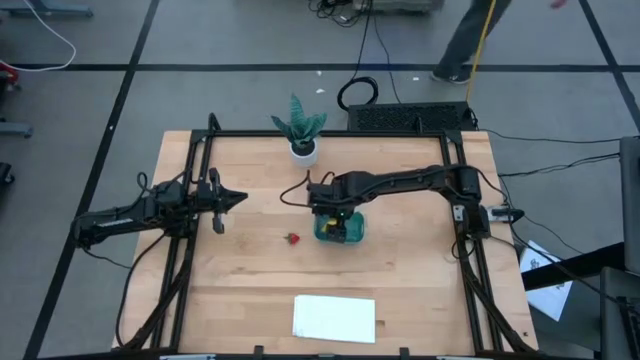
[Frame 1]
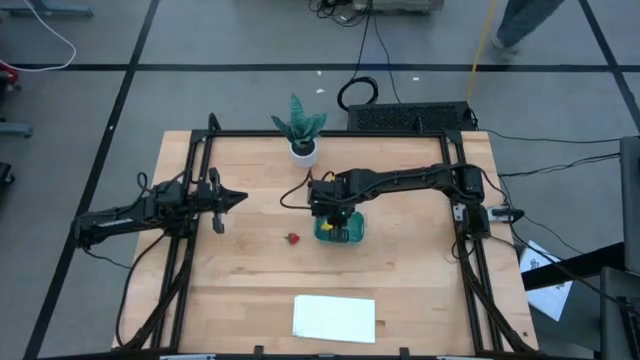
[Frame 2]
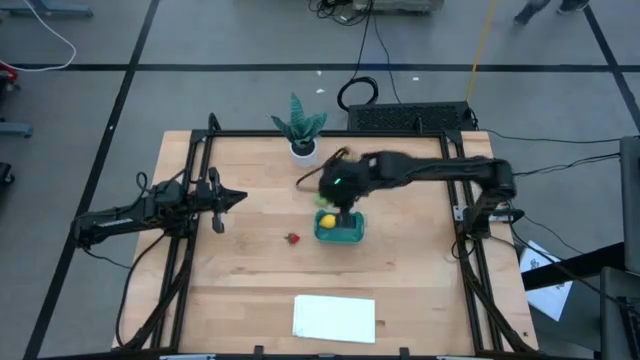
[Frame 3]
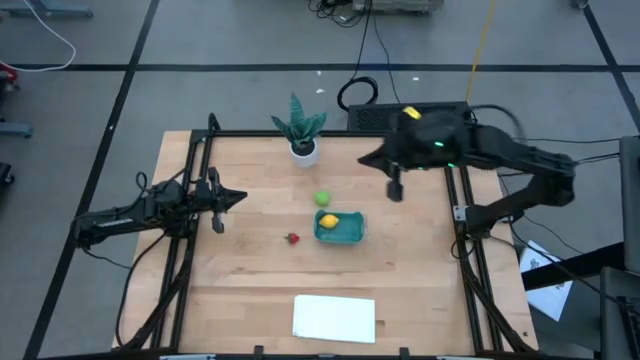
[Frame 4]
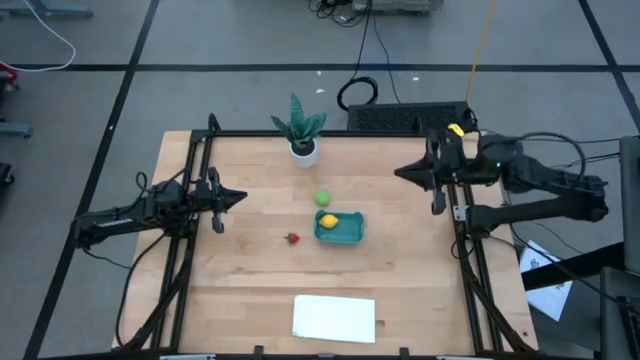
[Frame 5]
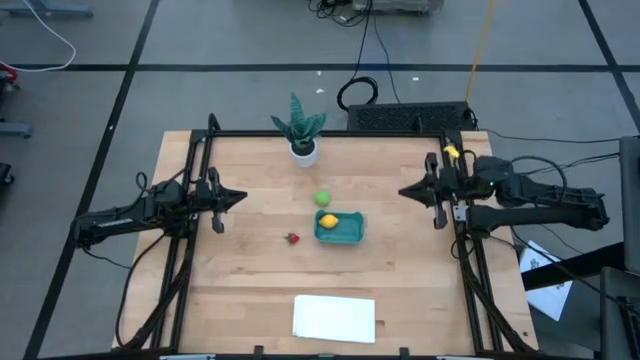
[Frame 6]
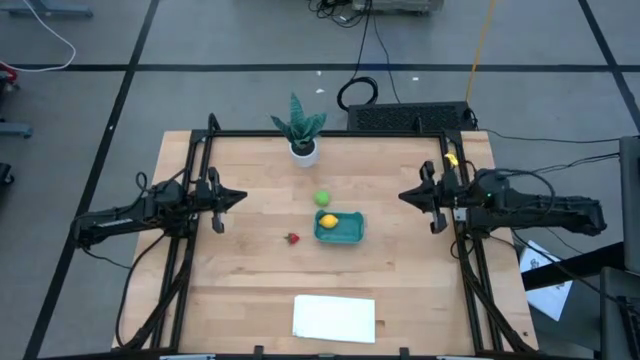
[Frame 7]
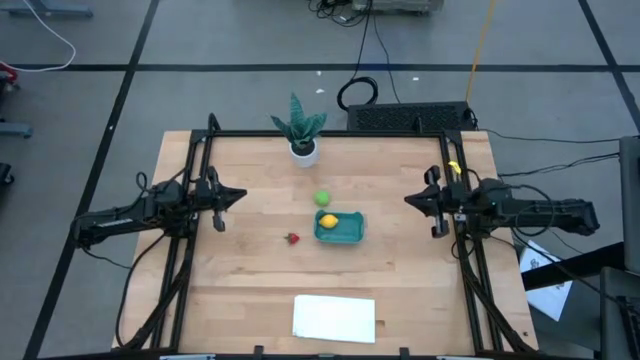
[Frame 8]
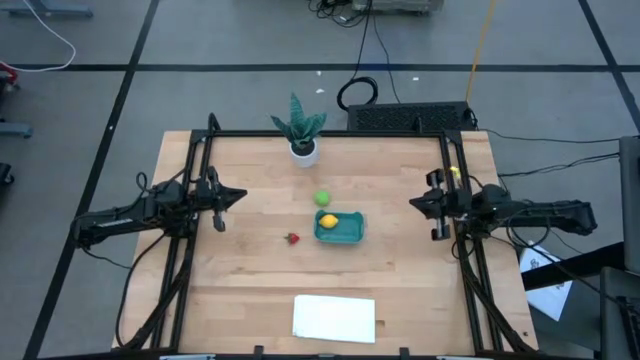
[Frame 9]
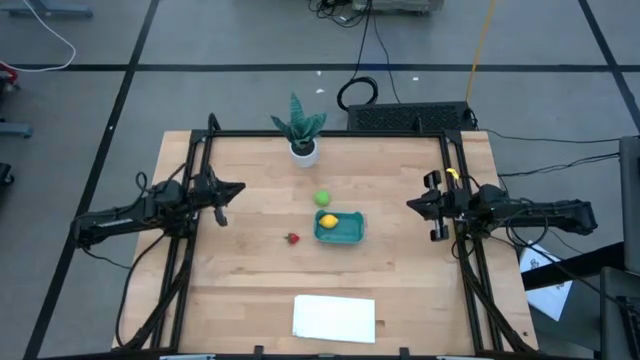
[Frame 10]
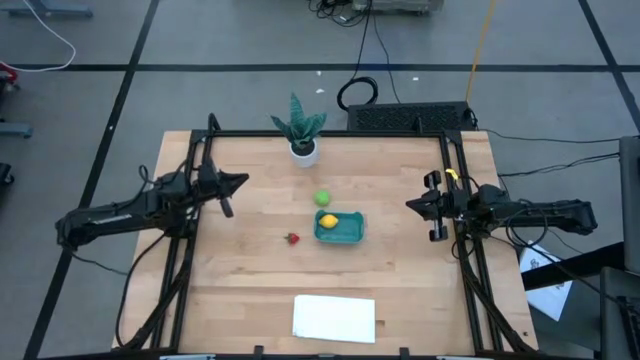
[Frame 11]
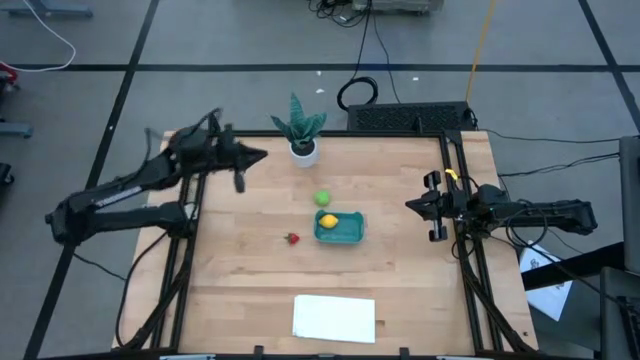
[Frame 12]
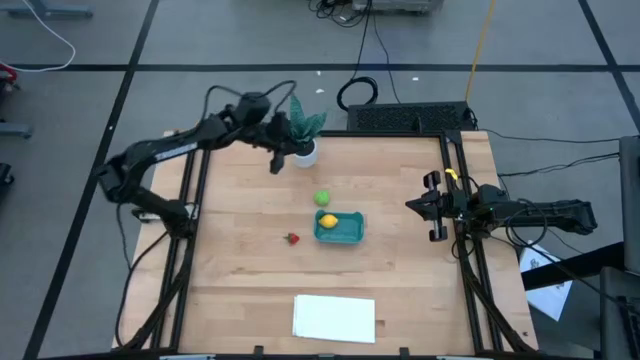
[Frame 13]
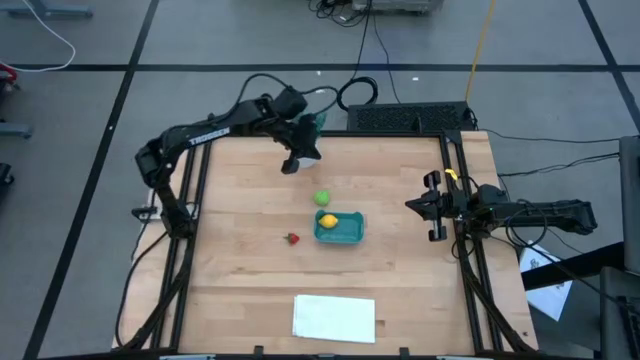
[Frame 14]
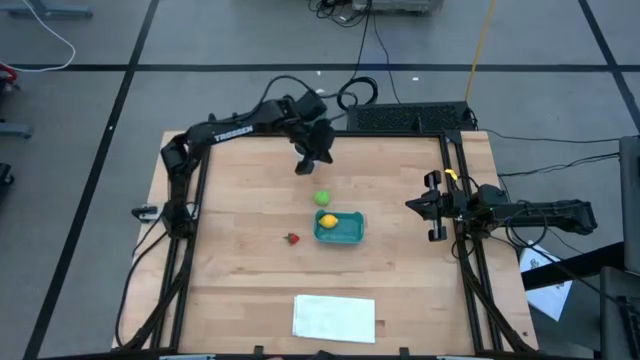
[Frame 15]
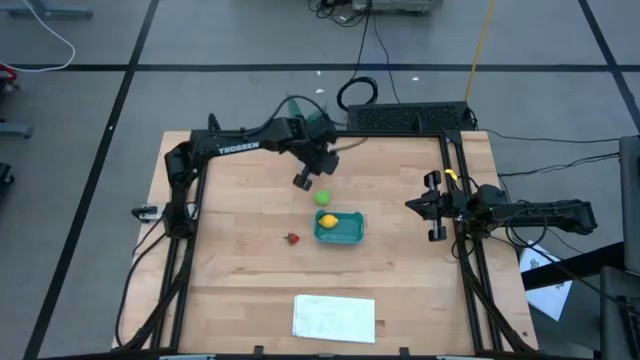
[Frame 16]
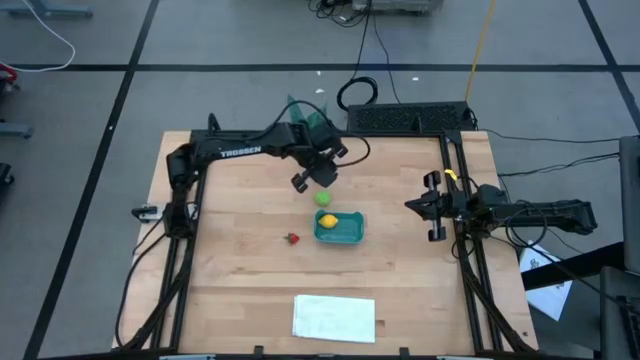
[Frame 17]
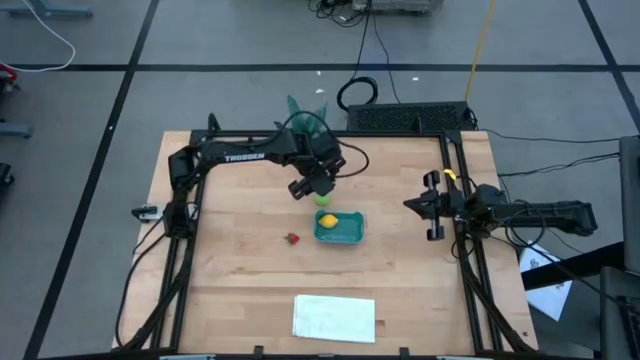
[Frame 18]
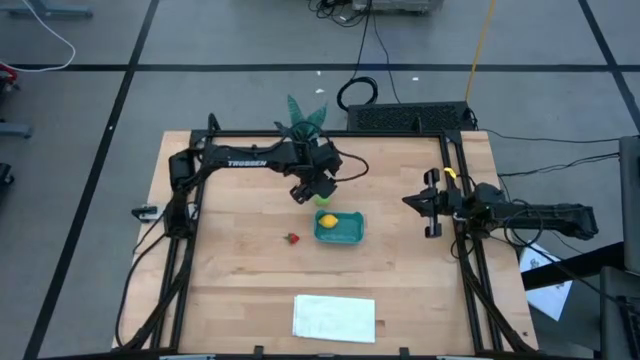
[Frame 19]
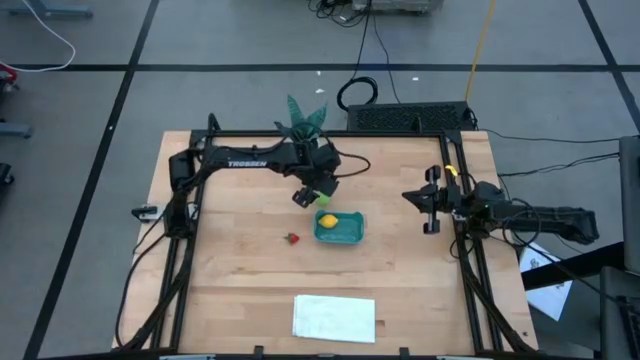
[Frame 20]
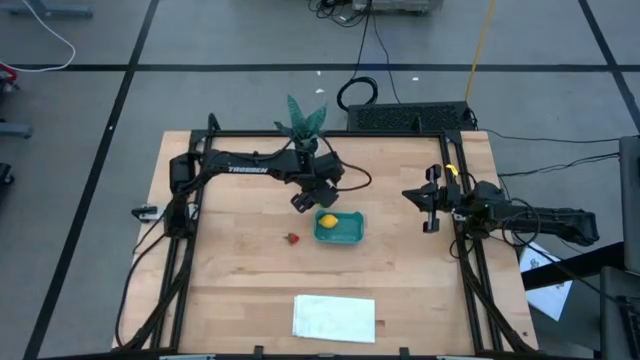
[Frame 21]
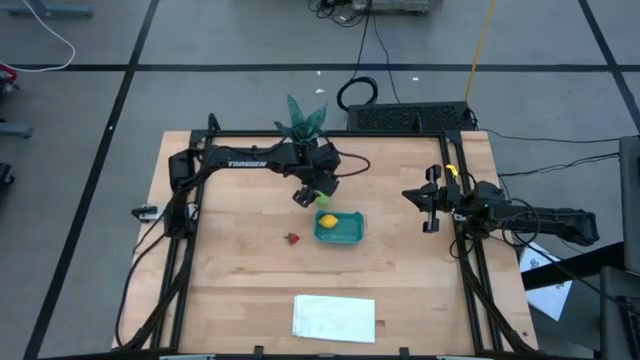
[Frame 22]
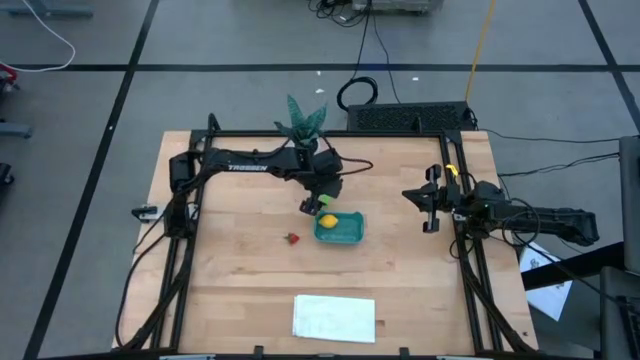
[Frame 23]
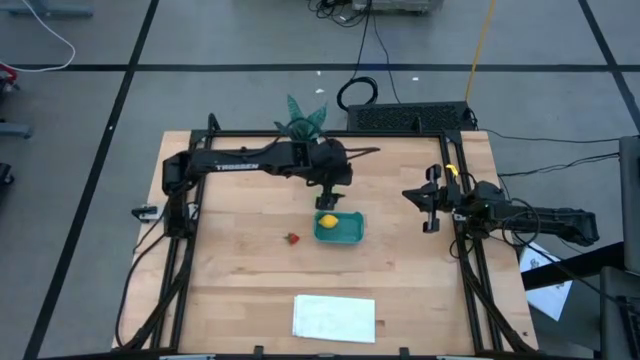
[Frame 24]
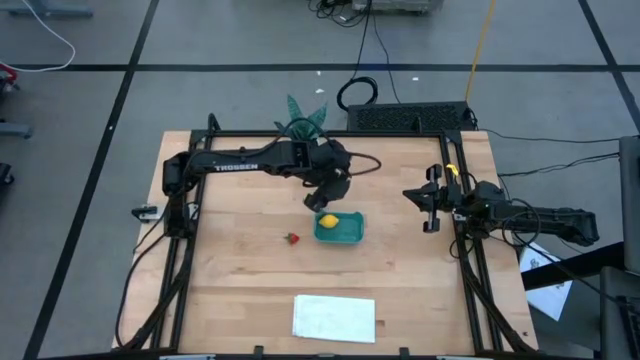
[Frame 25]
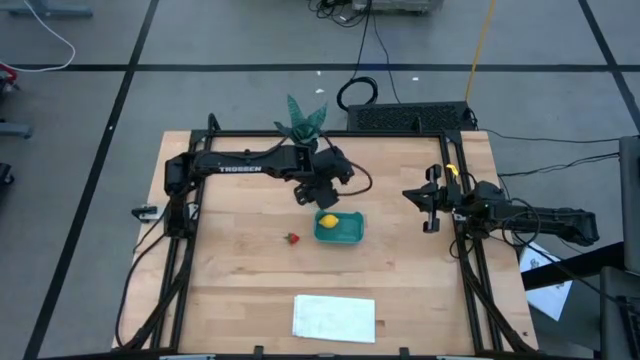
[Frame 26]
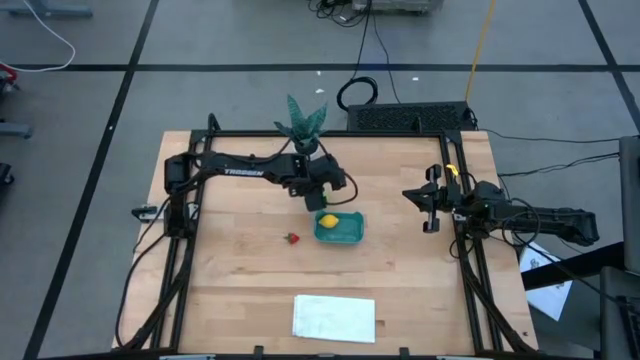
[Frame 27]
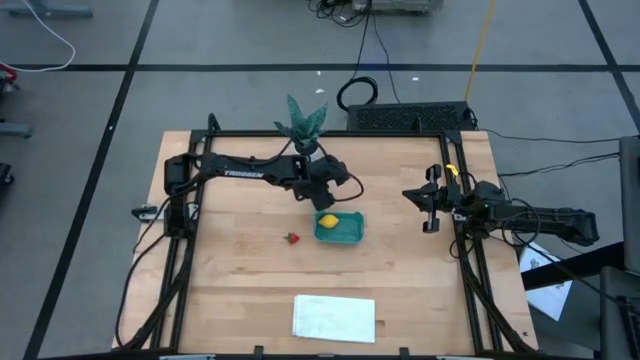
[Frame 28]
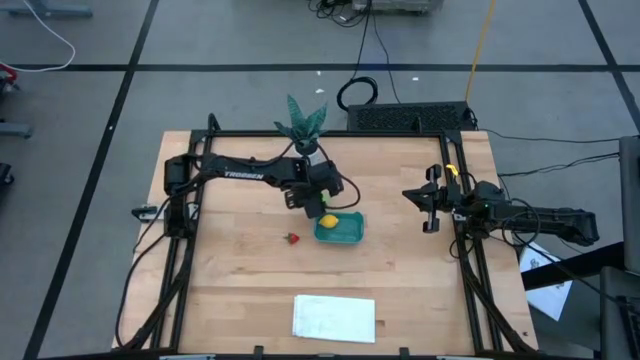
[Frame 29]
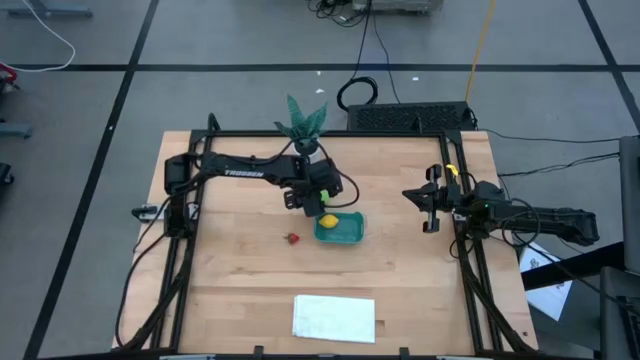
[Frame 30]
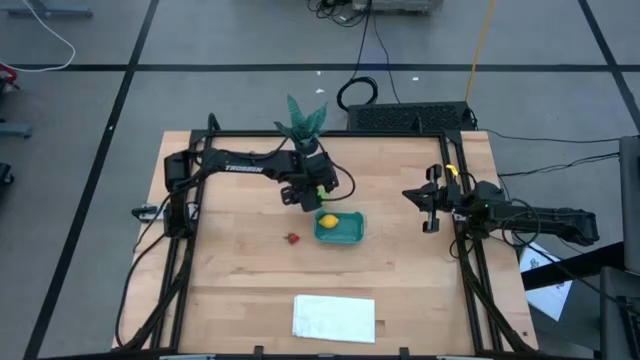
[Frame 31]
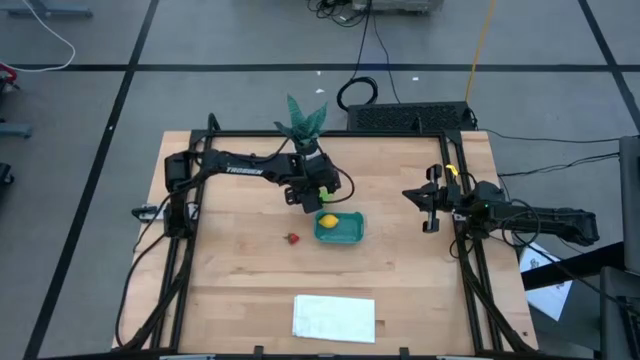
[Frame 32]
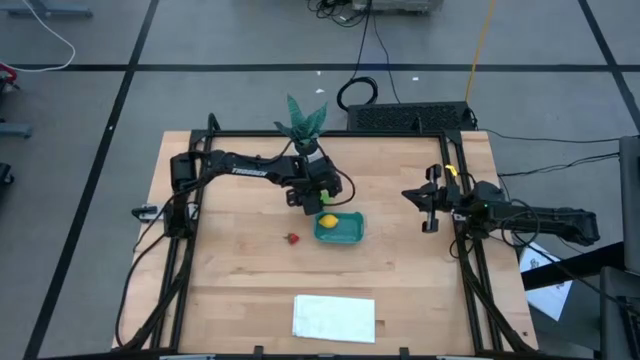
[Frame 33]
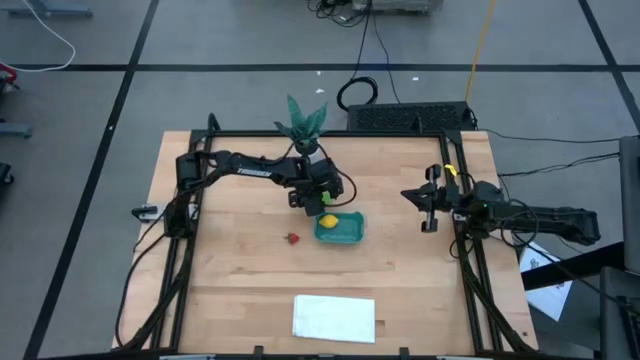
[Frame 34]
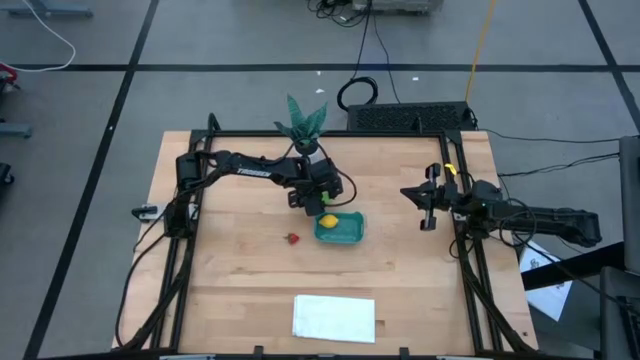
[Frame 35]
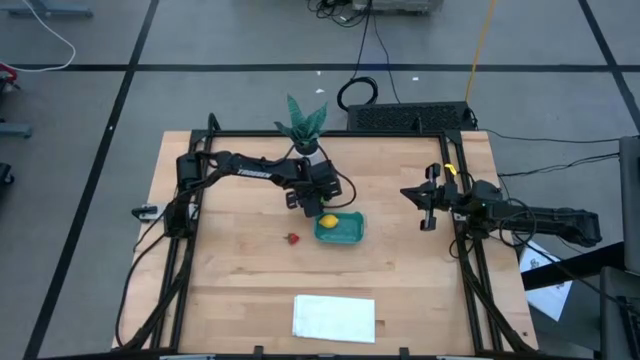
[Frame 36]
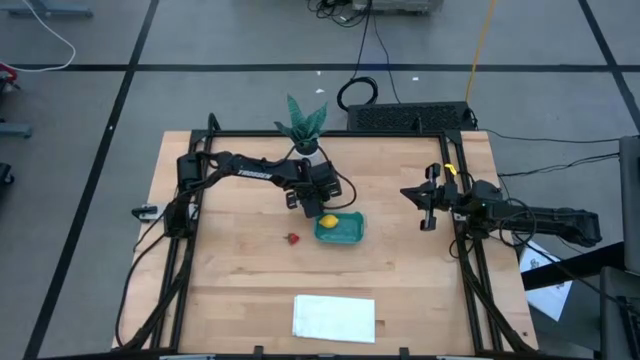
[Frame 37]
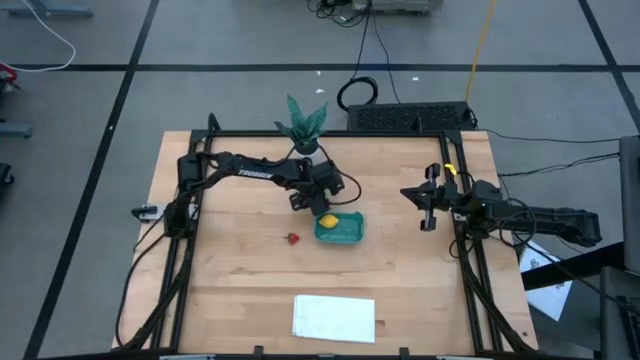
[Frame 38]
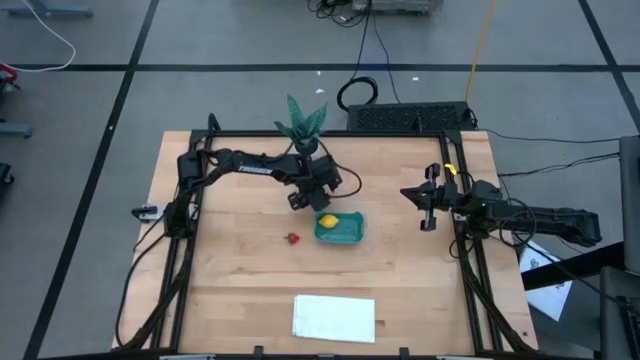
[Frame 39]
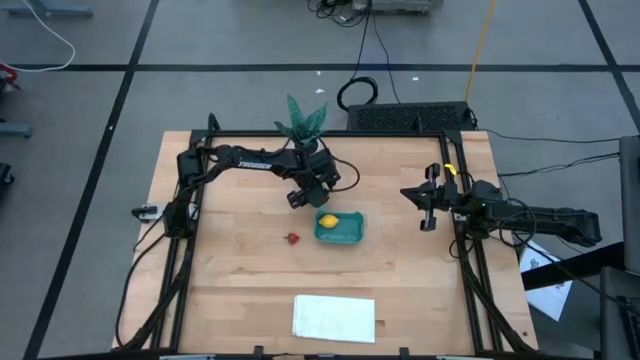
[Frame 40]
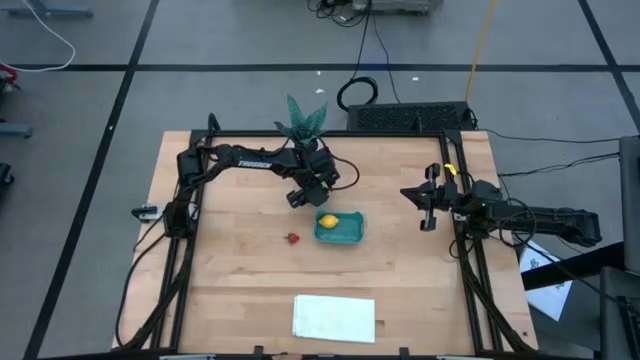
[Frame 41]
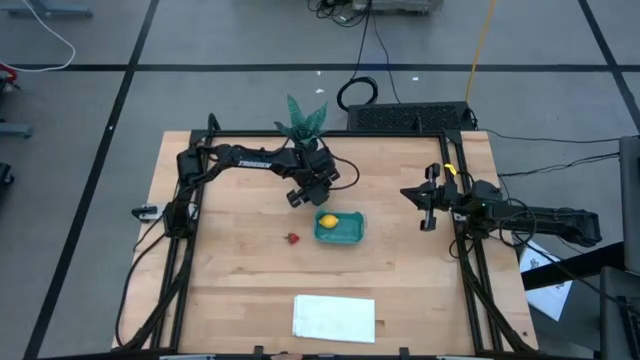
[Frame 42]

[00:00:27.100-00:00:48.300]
Task: Pick and placing Produce into tupperware
Put the cabbage into the green bin

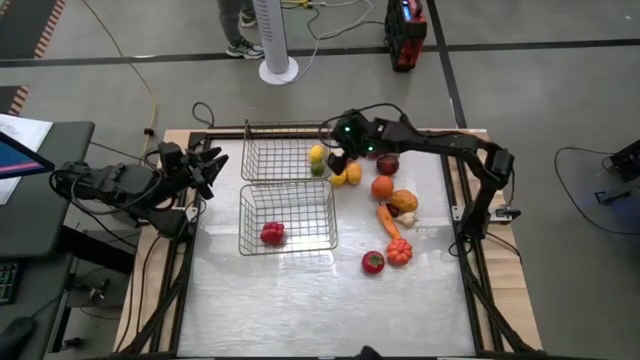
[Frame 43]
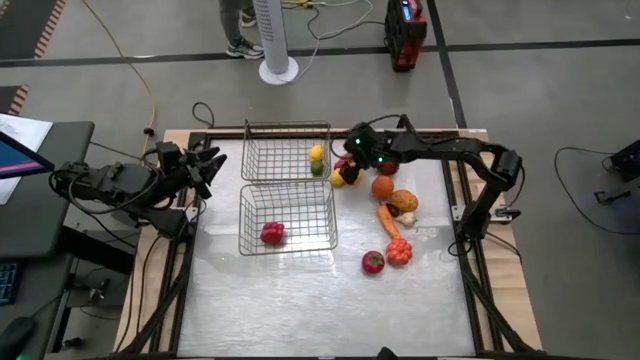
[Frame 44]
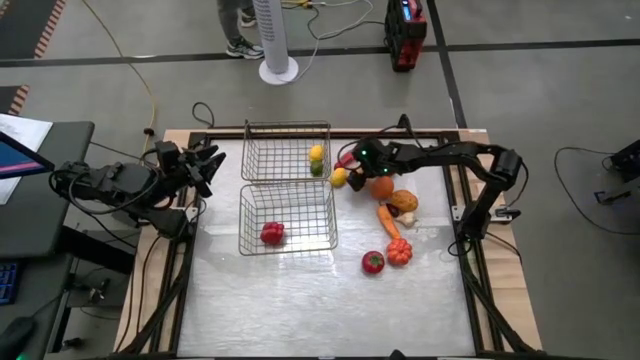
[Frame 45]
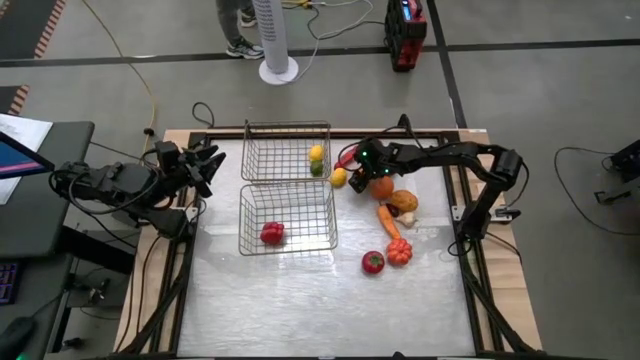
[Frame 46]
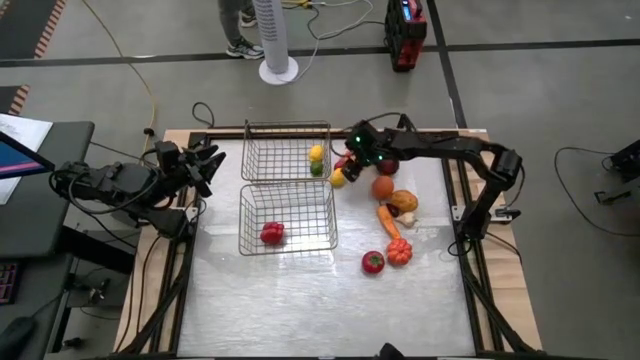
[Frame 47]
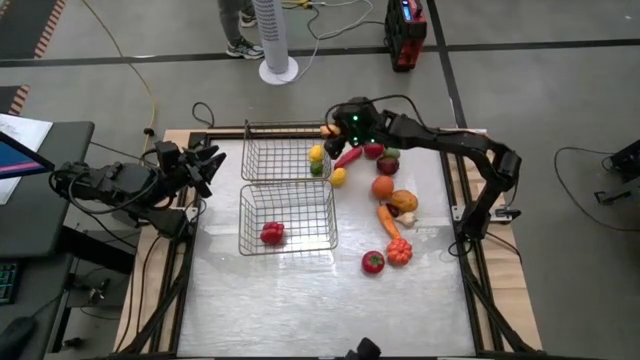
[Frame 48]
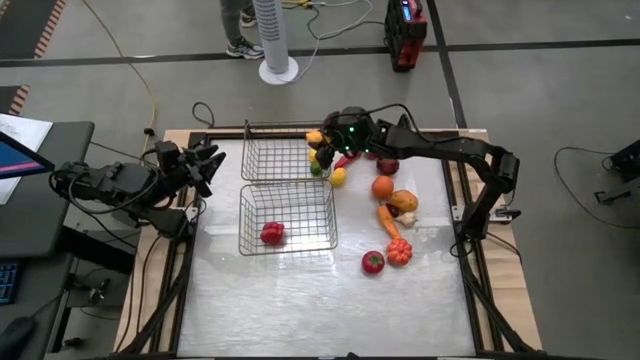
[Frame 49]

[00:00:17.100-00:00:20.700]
Task: Sort produce into baskets
Put the yellow lemon into the top mesh basket
